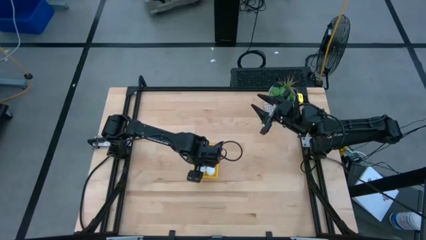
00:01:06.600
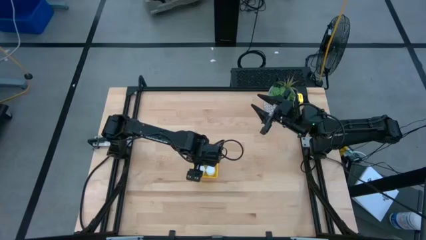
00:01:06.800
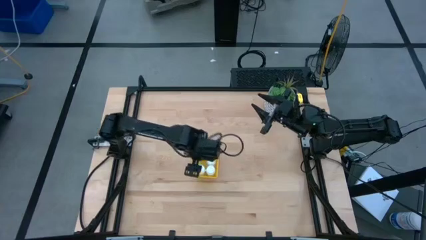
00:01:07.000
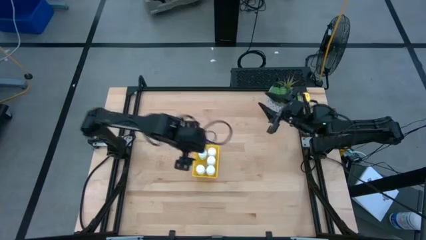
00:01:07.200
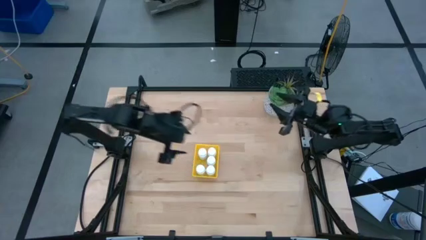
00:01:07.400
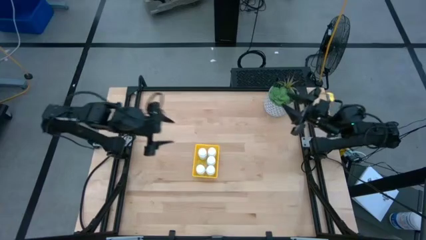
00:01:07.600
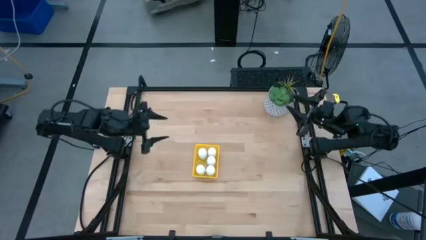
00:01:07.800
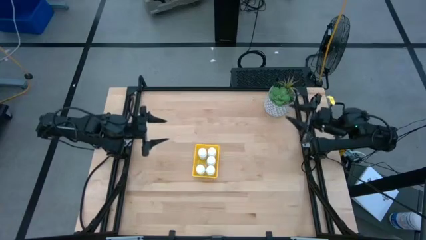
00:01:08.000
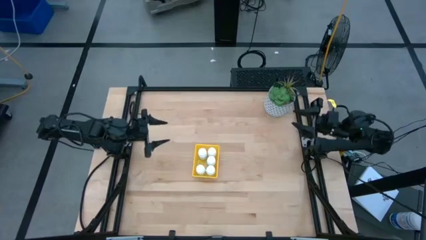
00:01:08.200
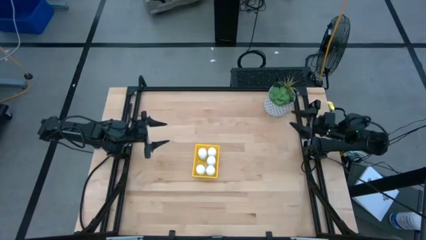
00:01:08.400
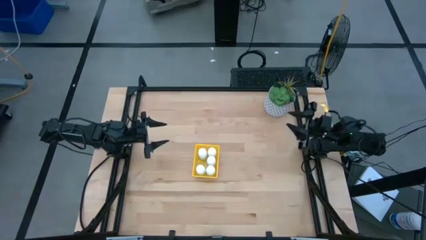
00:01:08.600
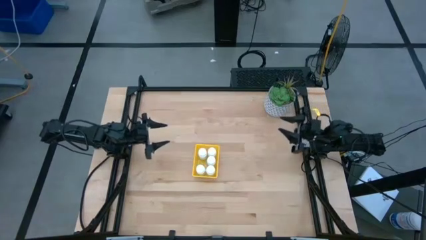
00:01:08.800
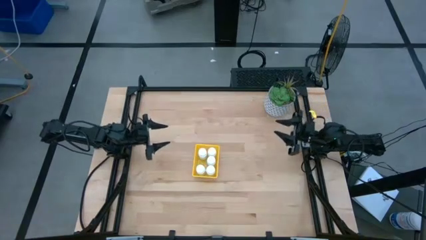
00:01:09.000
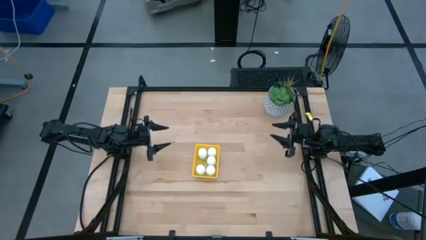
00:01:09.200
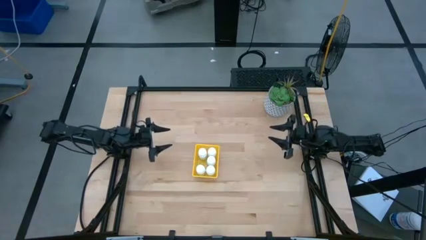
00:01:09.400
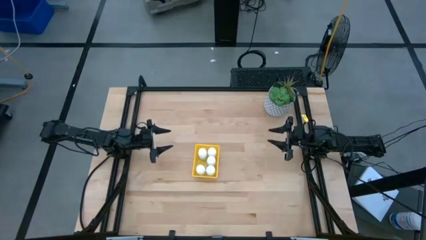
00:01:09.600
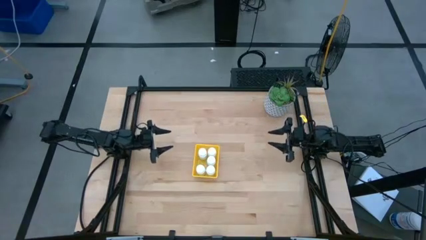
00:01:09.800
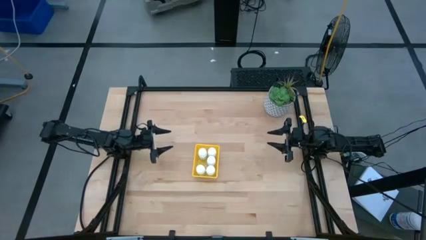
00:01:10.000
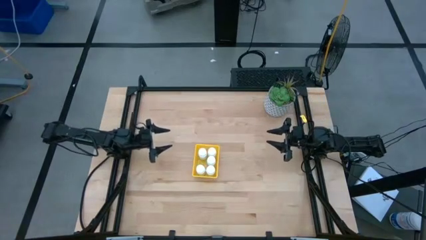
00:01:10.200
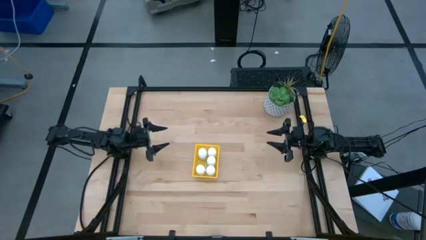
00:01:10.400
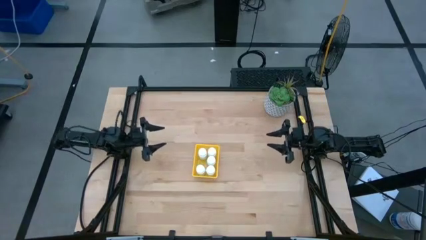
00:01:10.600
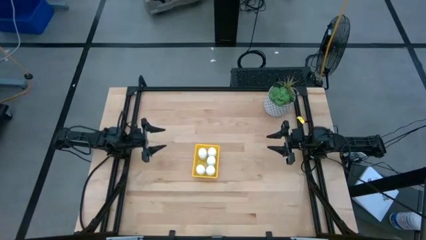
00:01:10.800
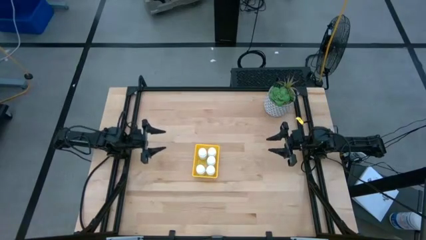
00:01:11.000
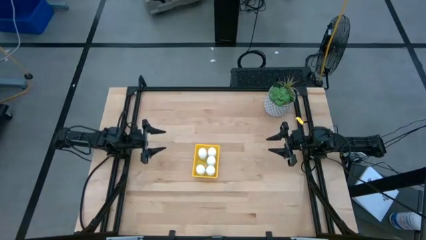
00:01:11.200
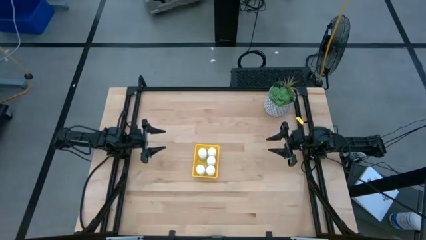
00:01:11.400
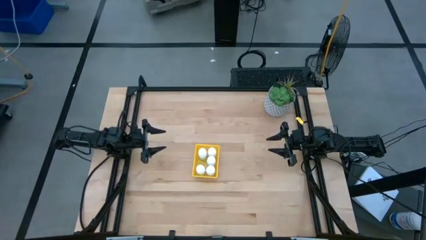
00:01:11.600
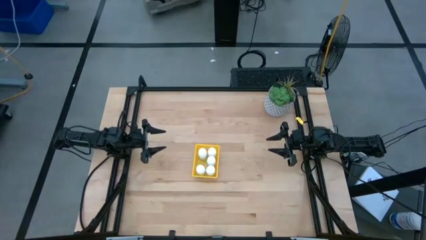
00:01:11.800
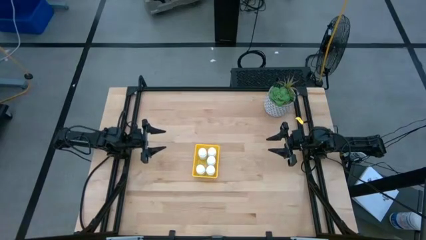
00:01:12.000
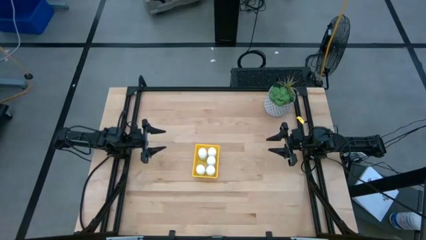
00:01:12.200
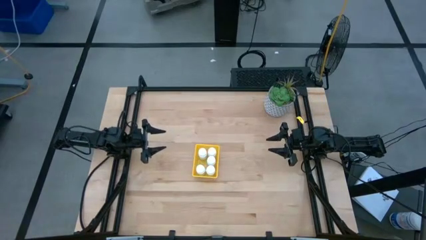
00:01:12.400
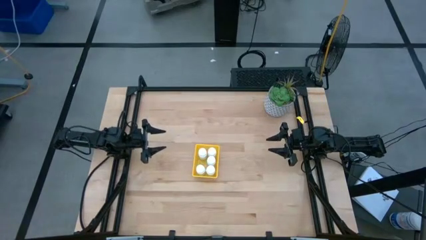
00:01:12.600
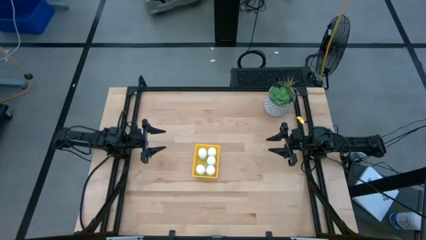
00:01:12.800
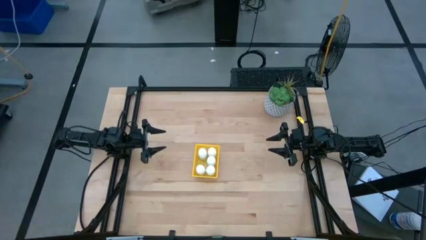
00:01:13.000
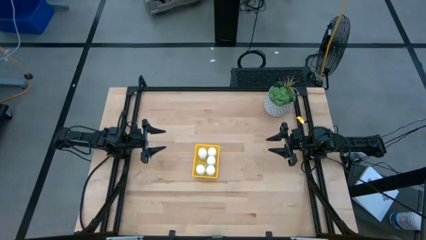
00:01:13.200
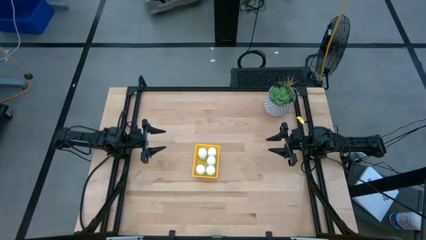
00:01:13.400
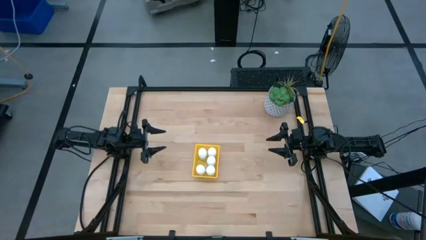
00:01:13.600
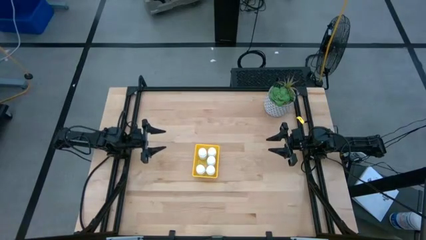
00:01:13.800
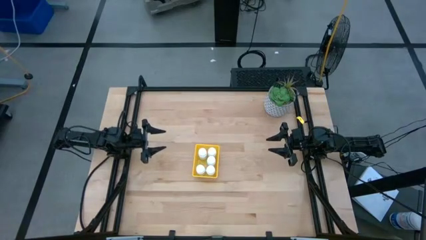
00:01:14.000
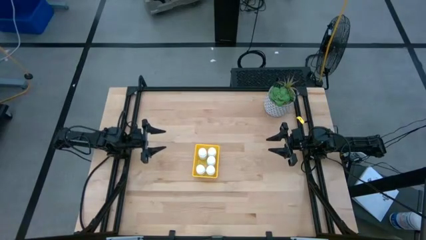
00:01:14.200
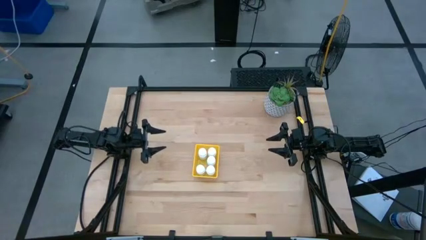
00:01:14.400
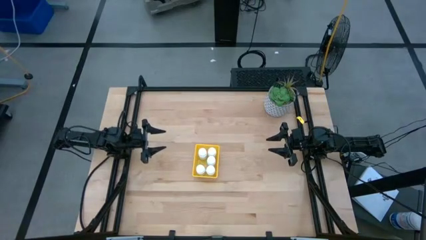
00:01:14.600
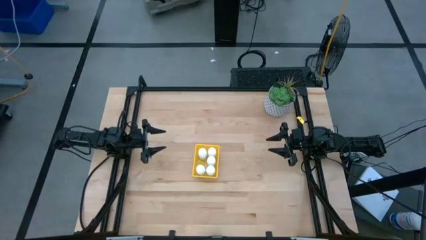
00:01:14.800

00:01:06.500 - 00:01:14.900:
Task: Pick and place pill bottles into a basket
Return to Home Position

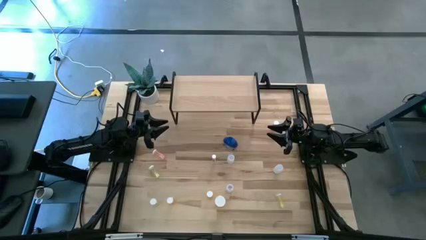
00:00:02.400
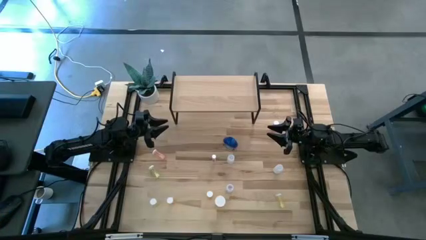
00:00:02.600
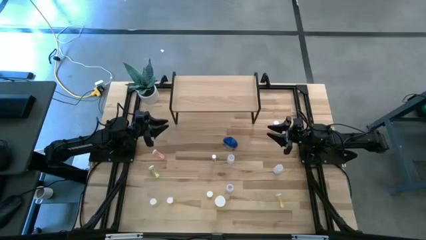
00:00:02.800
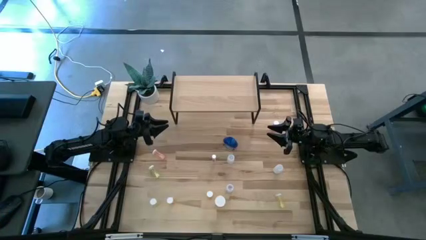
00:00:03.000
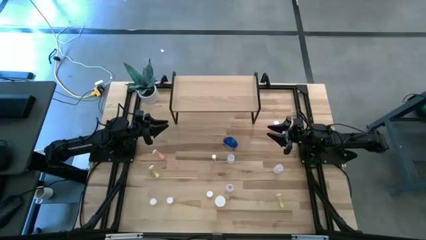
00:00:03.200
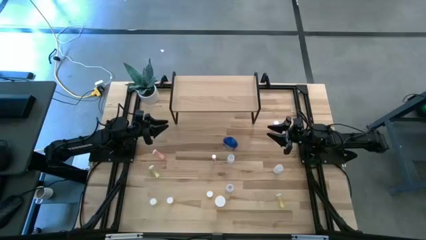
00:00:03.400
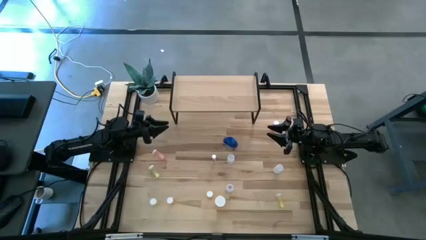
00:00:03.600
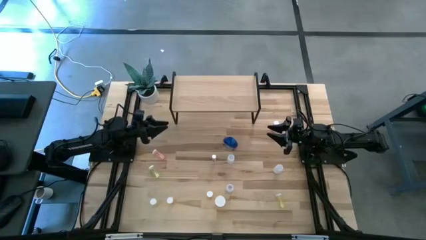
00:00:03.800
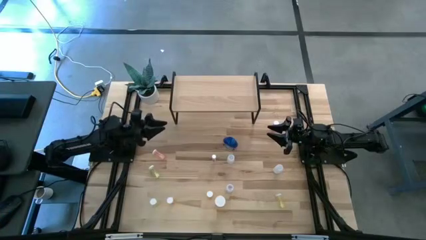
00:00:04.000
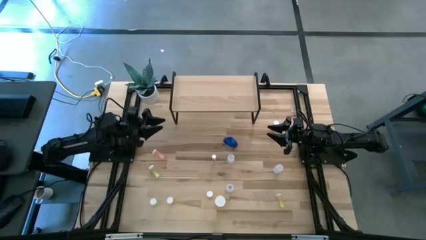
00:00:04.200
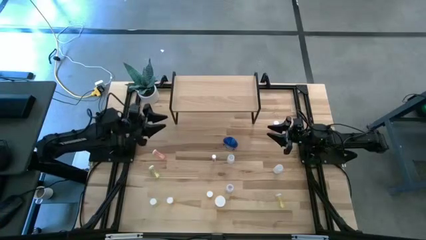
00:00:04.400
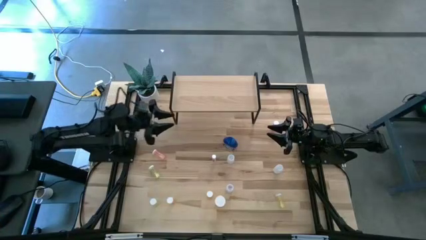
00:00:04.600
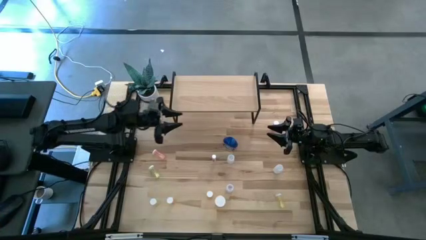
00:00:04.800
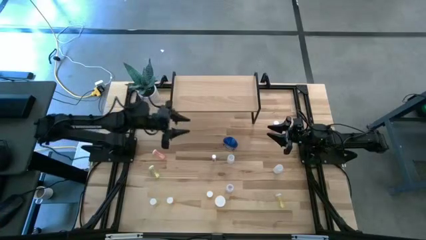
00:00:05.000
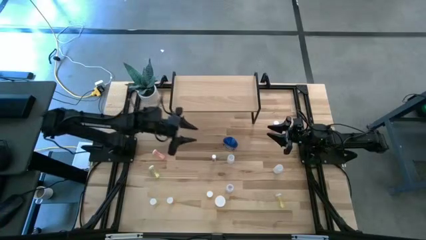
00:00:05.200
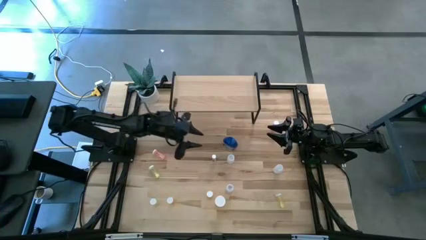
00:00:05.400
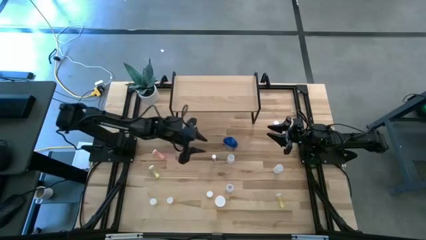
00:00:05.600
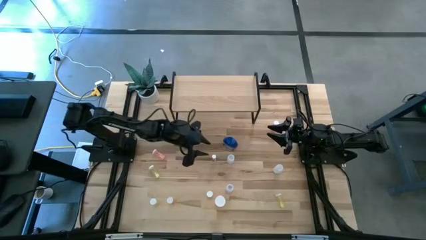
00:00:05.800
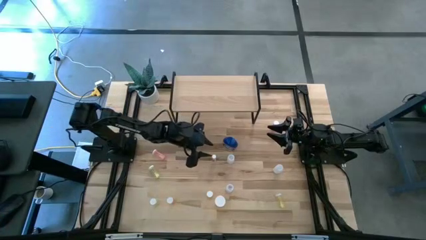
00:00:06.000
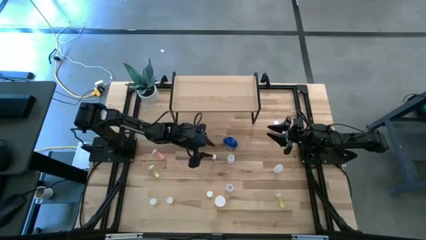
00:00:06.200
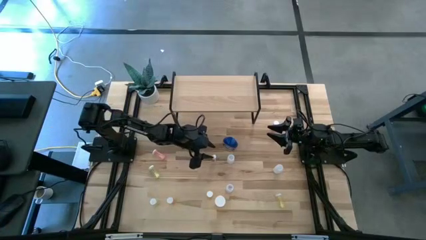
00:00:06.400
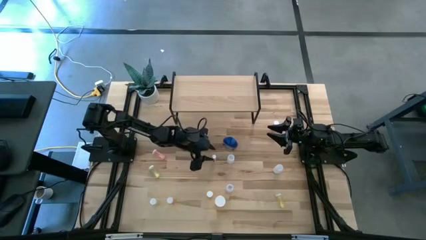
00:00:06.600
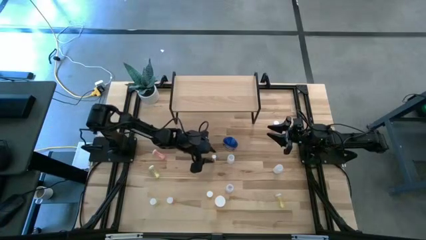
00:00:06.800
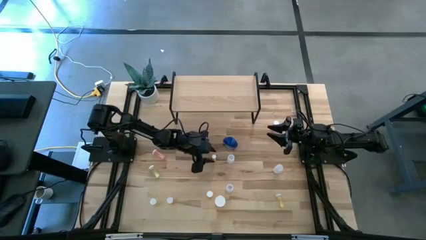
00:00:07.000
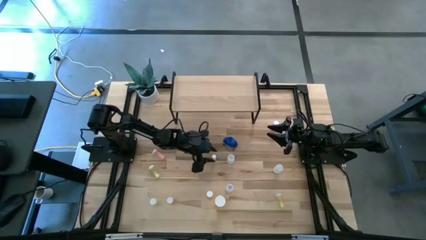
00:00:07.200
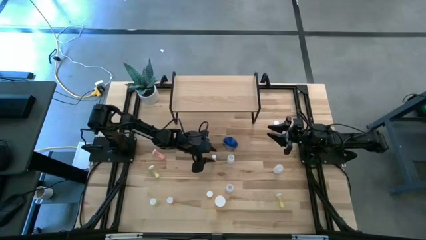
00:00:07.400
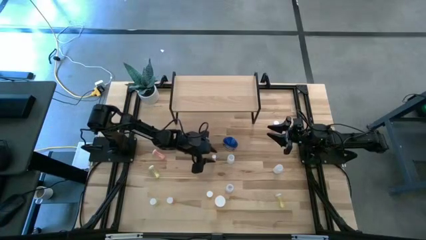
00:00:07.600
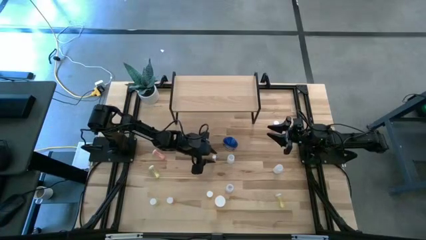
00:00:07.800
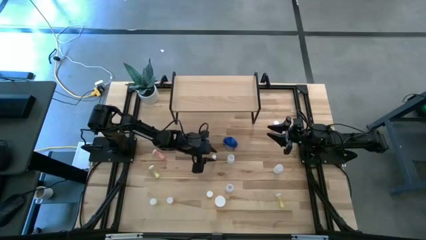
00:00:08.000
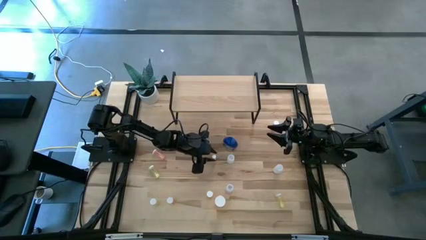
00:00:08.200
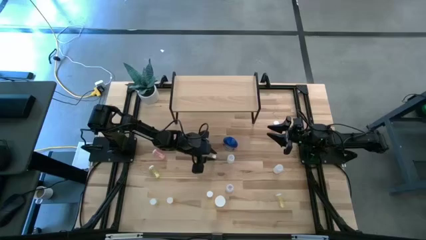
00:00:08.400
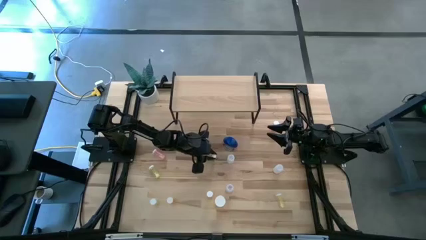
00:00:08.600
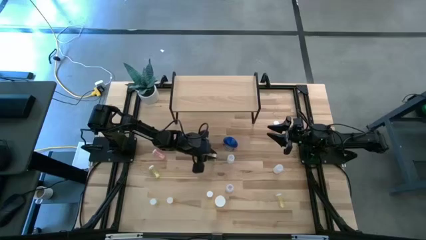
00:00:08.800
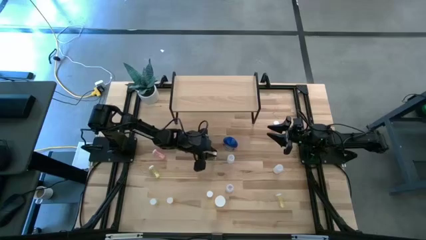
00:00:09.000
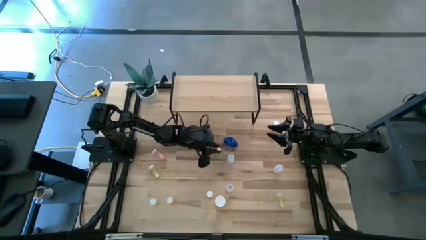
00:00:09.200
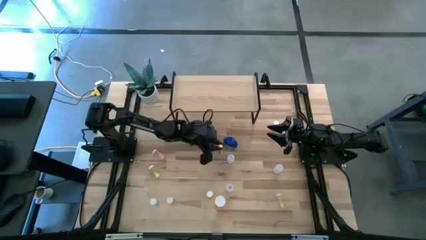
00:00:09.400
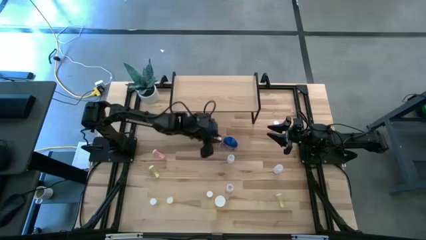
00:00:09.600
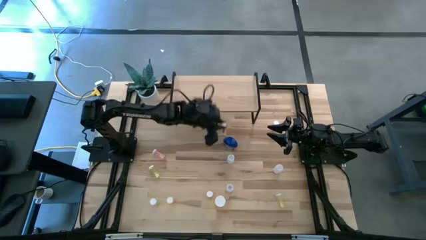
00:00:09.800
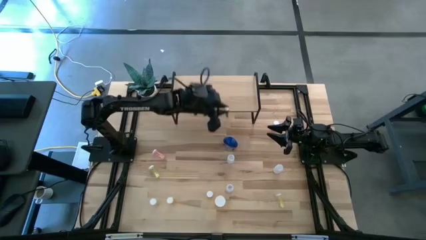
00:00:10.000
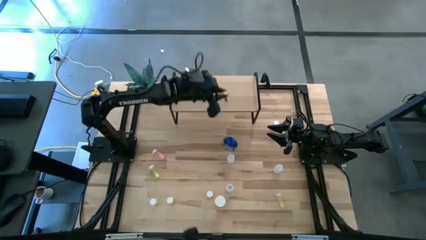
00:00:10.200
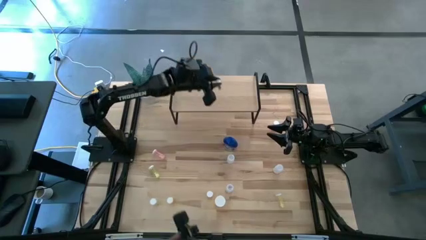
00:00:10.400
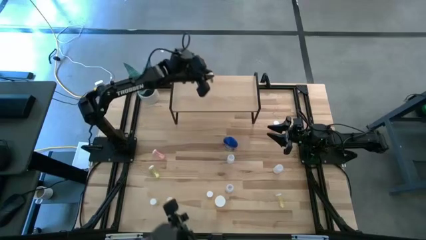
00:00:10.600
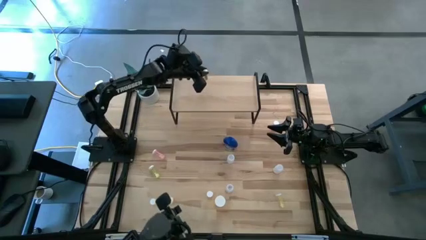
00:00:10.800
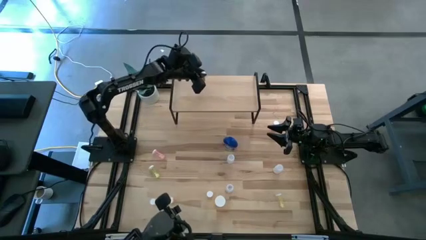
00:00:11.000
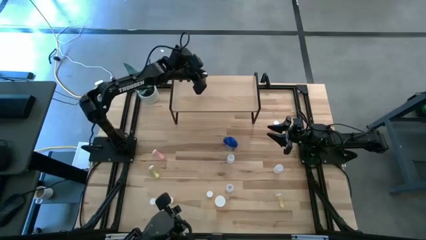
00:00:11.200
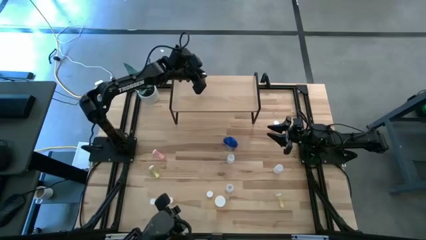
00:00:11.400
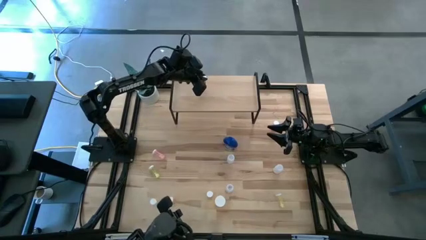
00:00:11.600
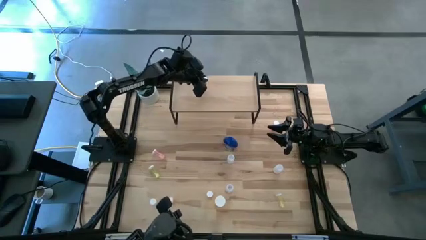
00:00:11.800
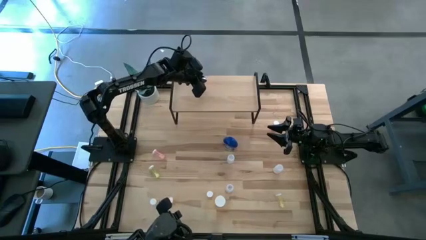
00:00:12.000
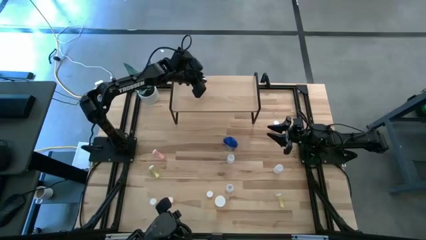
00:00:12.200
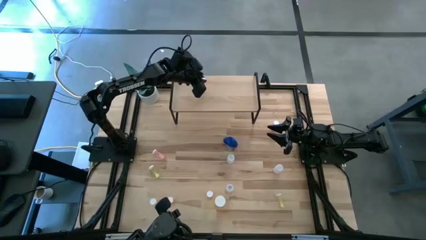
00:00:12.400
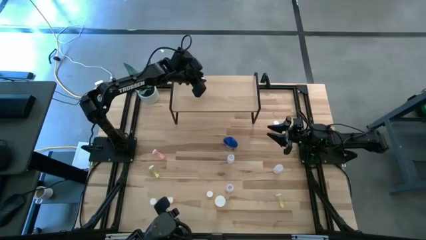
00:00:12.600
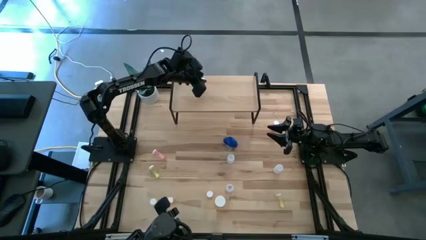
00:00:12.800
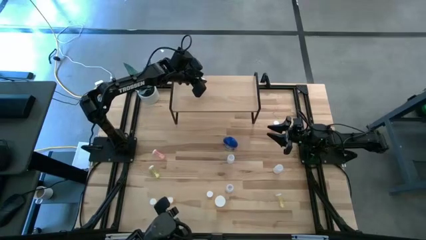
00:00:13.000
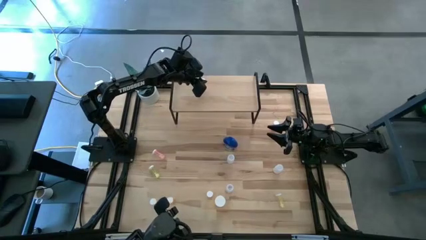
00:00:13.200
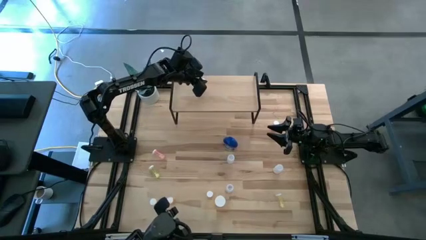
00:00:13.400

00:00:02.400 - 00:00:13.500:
Task: Pick and place medicine bottles onto shelf by color
Put the white and yellow pill bottle on the shelf
